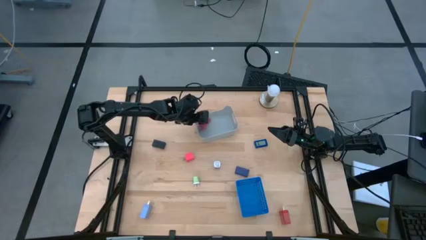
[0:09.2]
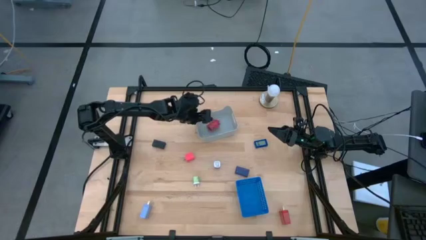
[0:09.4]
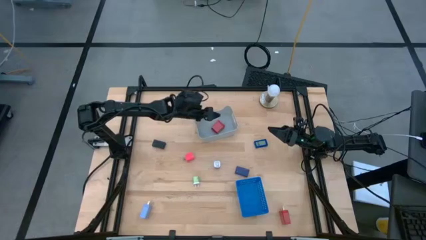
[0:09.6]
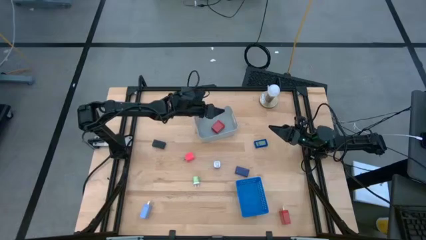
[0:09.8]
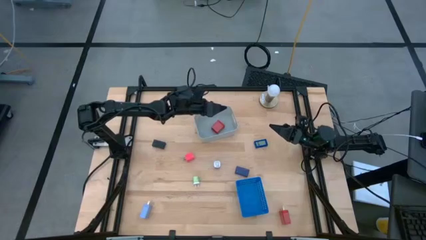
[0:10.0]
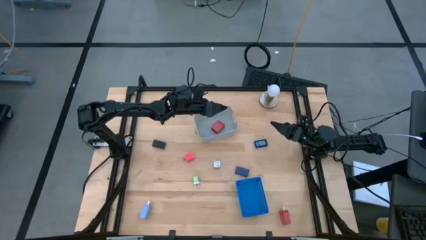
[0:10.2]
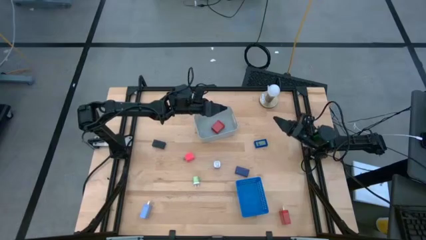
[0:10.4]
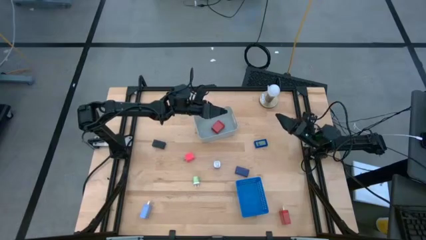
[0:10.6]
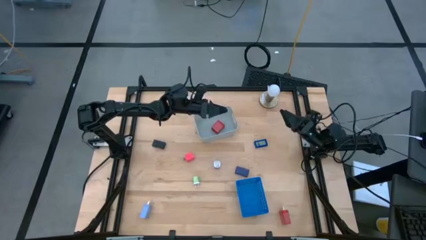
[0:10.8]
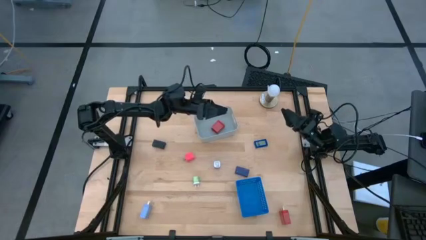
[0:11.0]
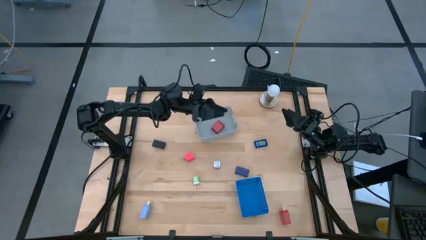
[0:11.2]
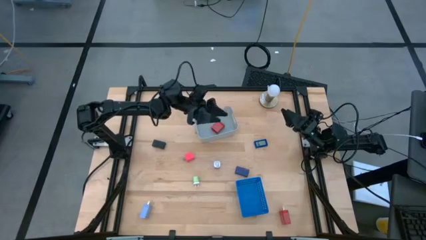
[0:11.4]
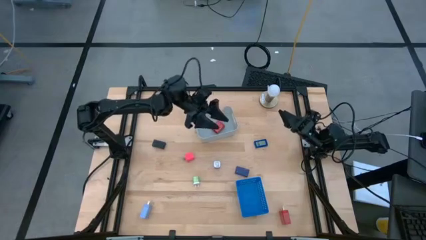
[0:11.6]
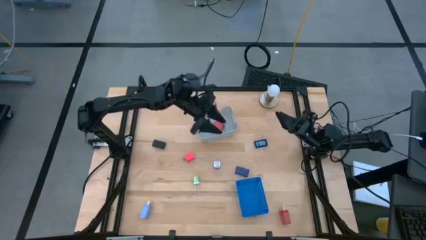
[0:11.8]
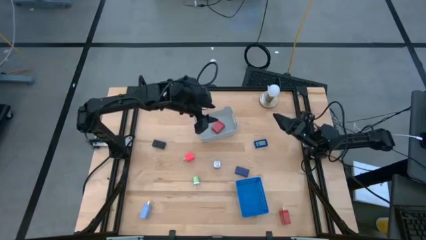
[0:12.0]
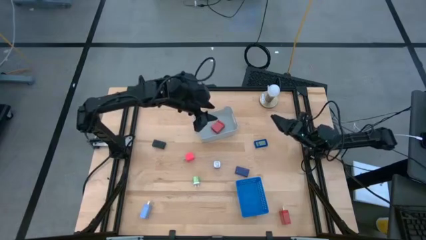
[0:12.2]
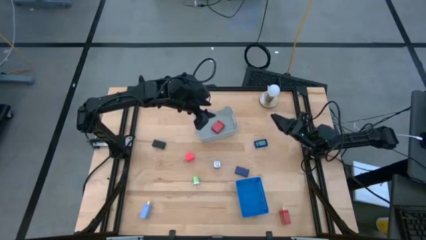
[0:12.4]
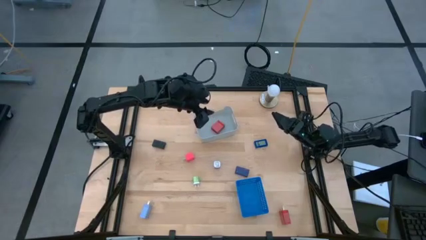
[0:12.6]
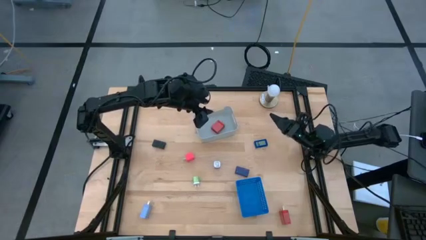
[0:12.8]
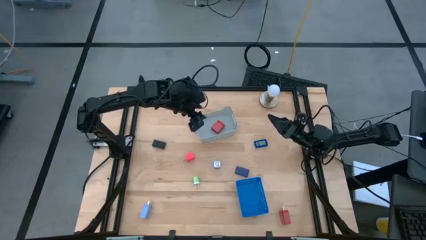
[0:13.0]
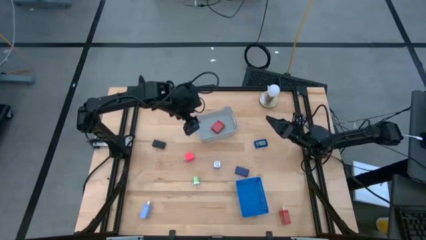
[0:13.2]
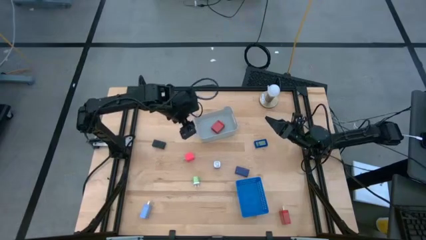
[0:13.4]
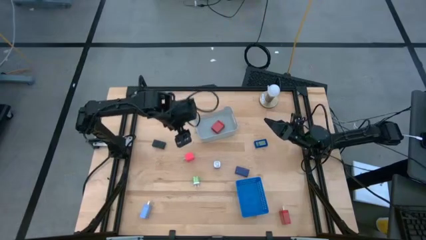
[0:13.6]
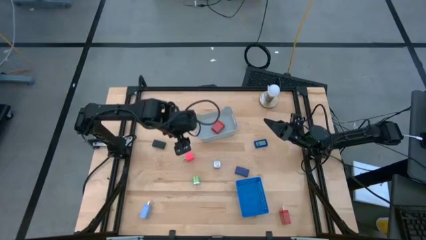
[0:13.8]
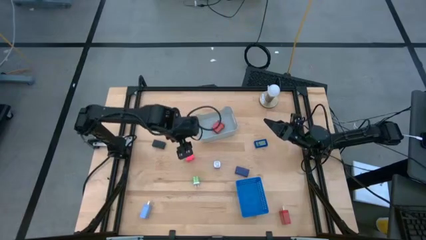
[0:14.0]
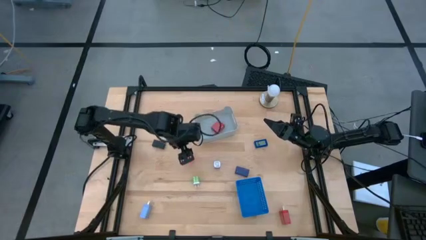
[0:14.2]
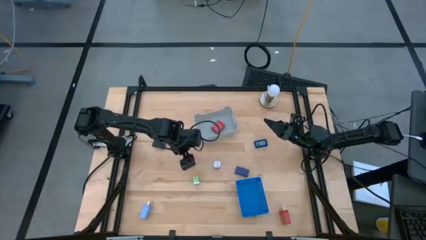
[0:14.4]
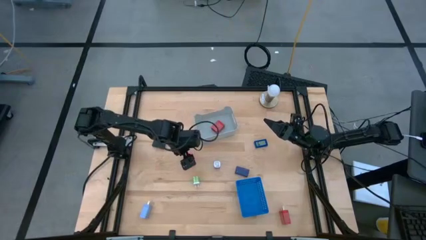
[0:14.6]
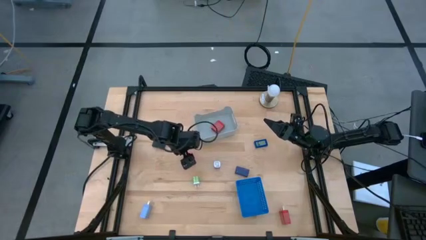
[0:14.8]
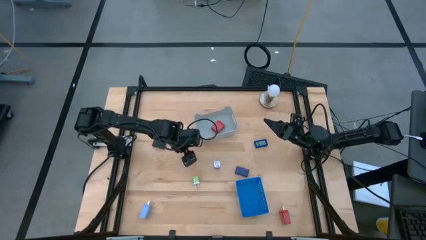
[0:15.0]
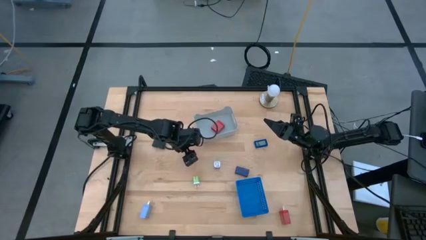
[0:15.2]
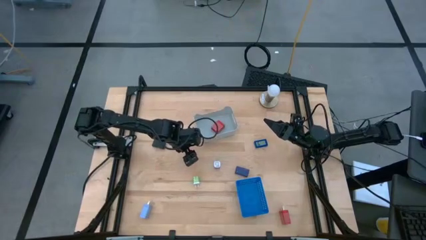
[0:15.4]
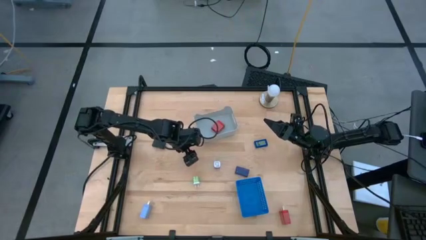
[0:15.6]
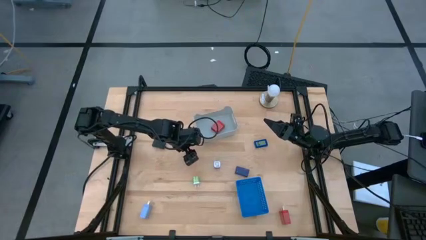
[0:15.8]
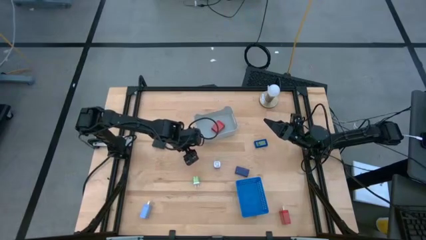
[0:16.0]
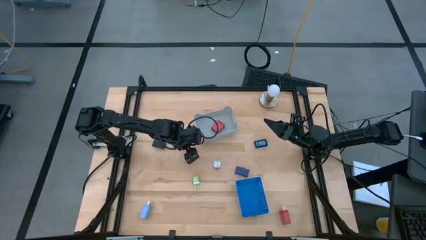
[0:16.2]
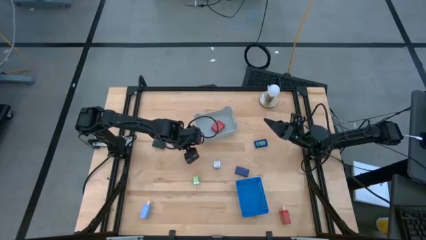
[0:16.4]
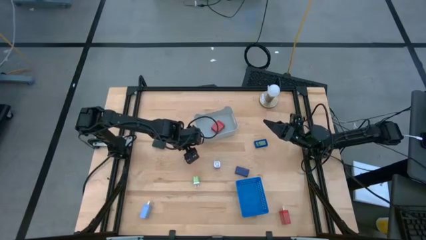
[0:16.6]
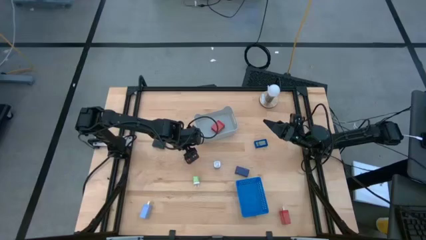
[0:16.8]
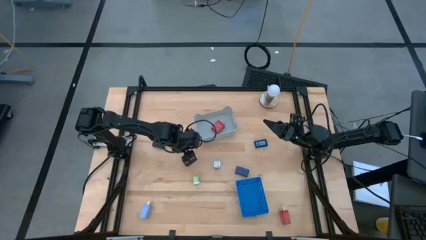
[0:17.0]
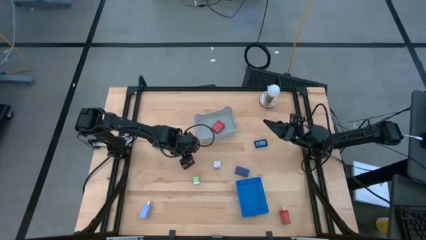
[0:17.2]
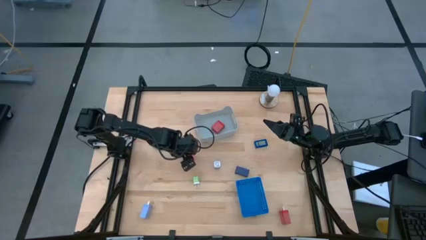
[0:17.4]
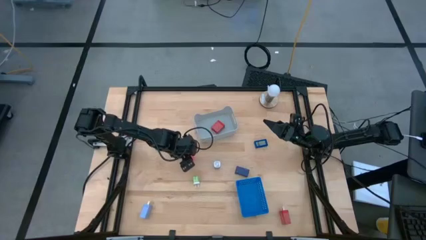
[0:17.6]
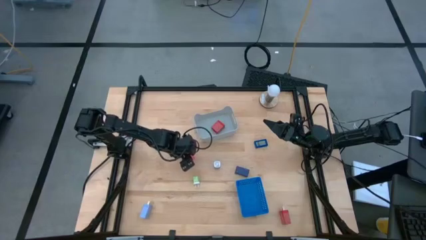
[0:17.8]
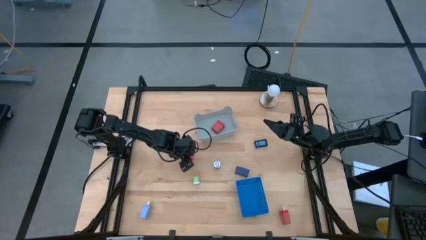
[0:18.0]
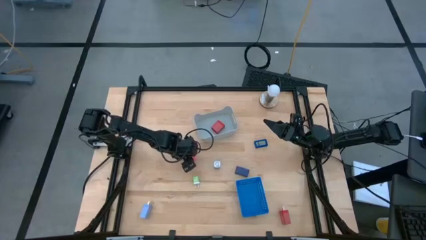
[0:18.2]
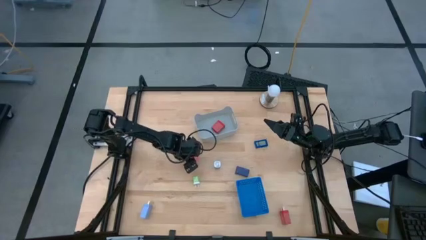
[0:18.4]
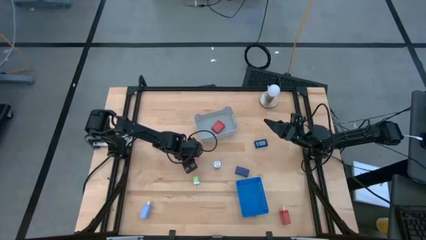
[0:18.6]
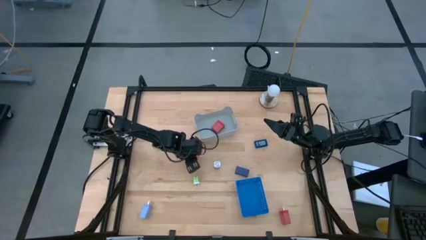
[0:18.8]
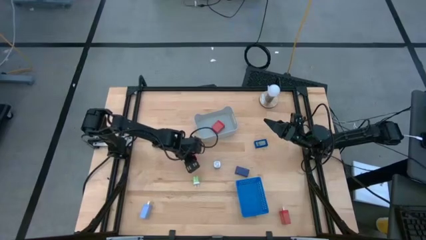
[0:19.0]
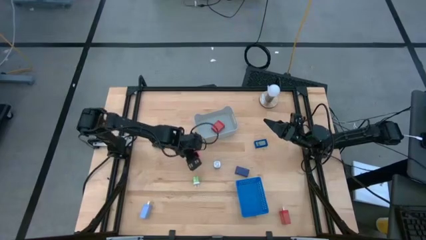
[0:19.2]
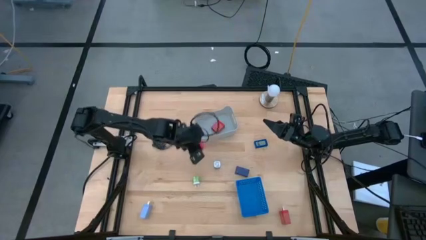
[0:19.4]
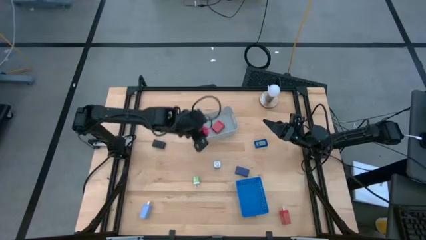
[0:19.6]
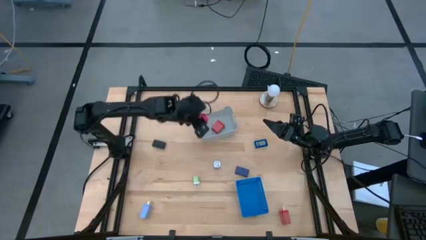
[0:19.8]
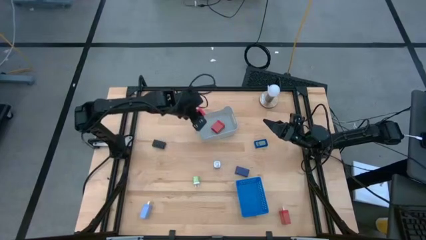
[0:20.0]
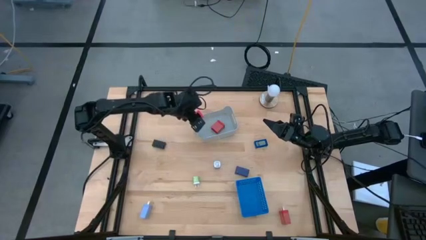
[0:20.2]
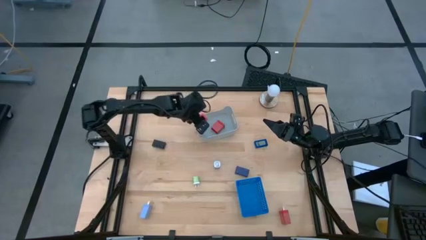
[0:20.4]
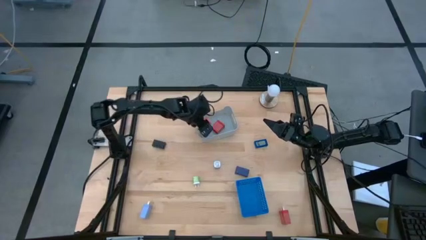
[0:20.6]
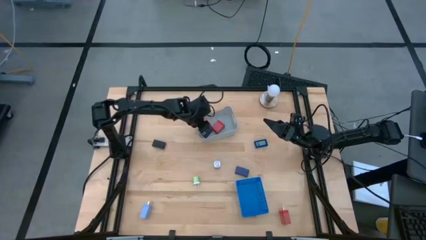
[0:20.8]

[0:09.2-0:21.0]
Task: Pick & Place Office items
Put the pink charger adapter into the gray bin
